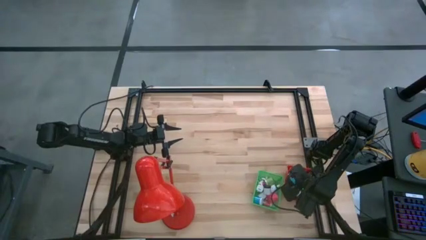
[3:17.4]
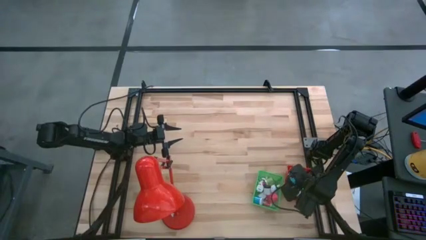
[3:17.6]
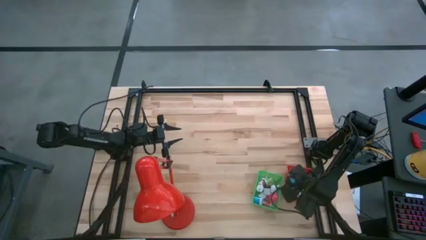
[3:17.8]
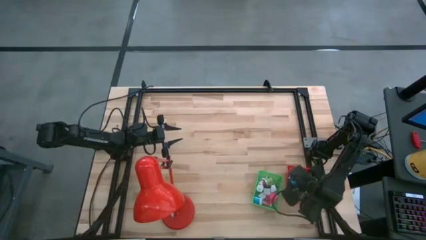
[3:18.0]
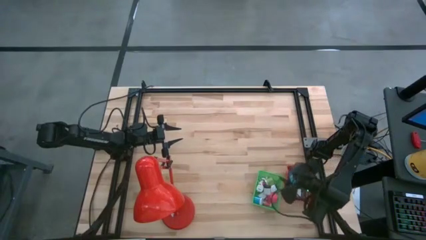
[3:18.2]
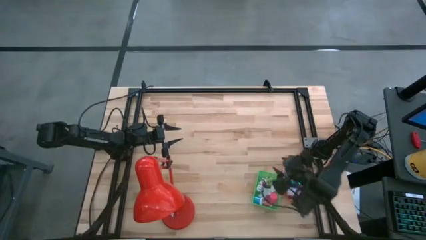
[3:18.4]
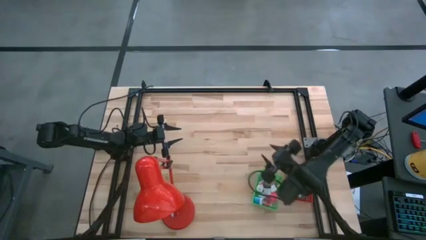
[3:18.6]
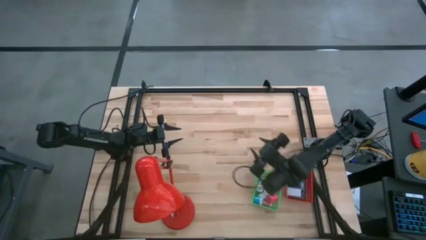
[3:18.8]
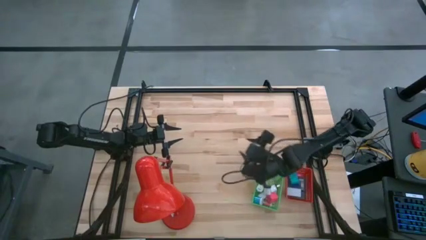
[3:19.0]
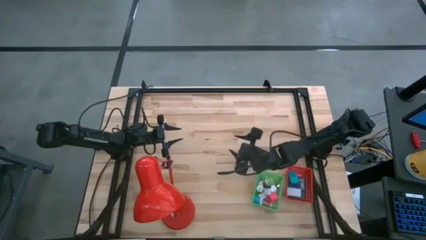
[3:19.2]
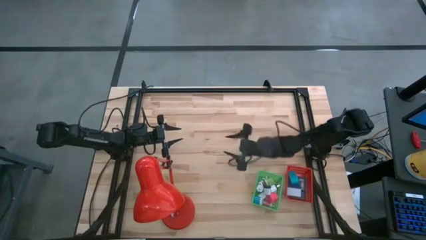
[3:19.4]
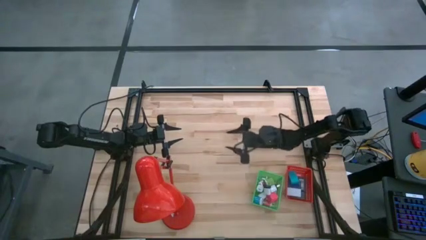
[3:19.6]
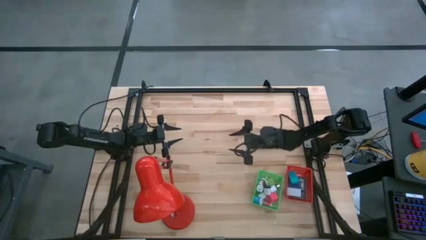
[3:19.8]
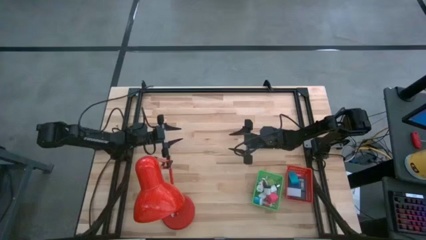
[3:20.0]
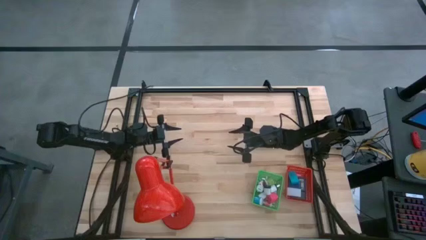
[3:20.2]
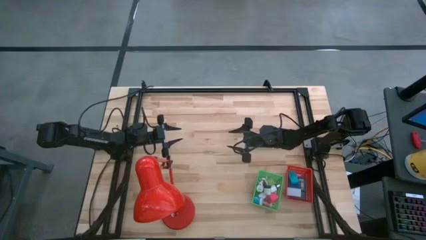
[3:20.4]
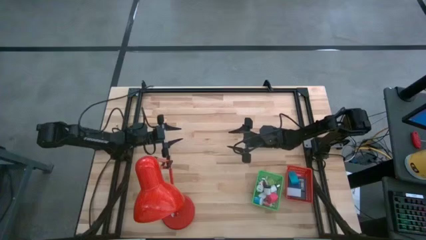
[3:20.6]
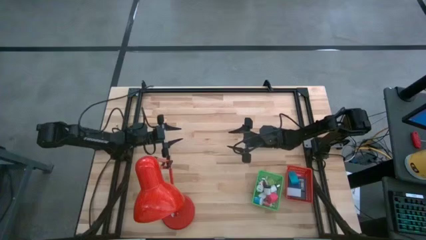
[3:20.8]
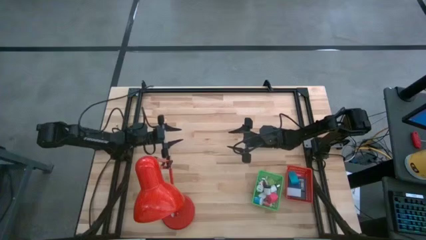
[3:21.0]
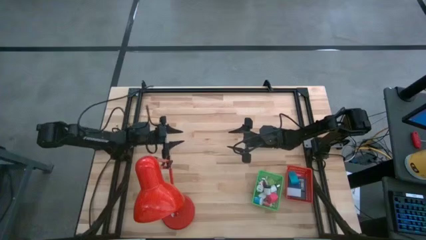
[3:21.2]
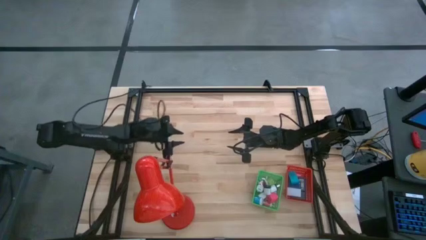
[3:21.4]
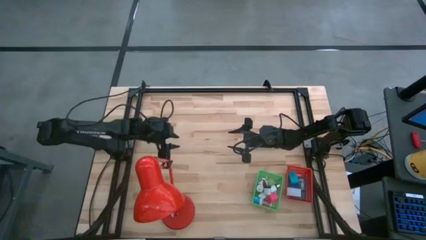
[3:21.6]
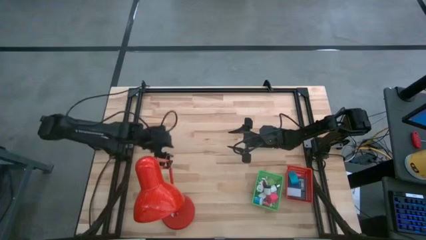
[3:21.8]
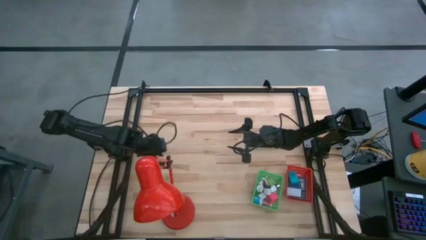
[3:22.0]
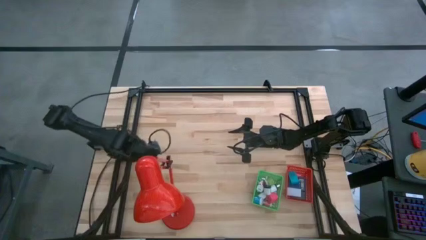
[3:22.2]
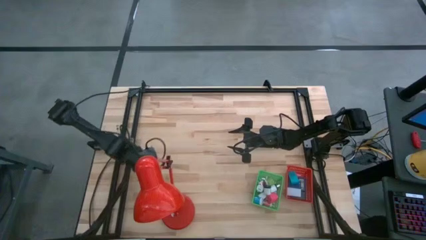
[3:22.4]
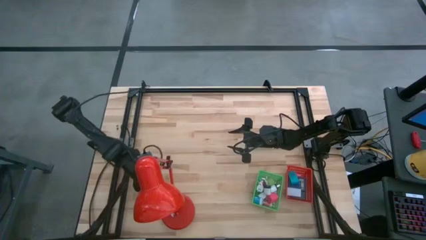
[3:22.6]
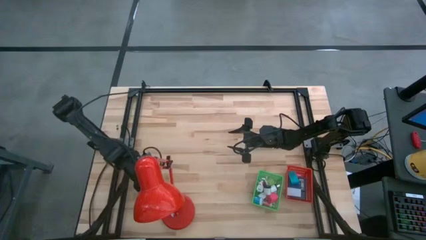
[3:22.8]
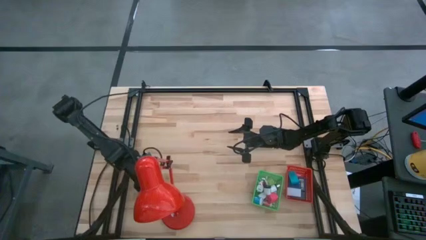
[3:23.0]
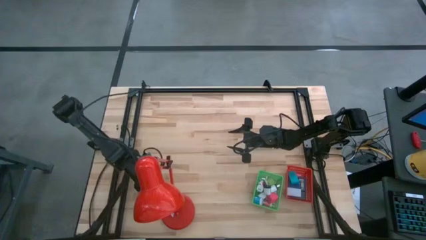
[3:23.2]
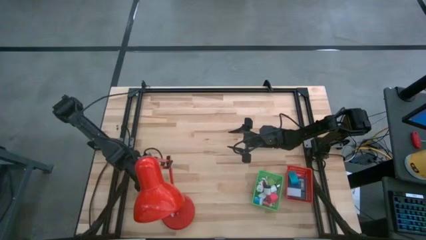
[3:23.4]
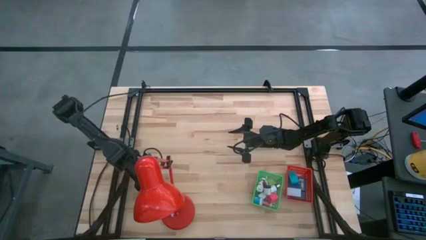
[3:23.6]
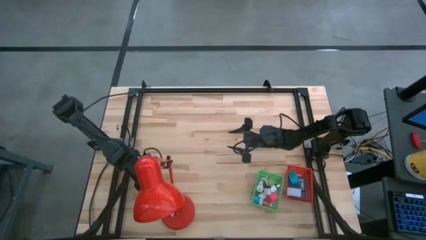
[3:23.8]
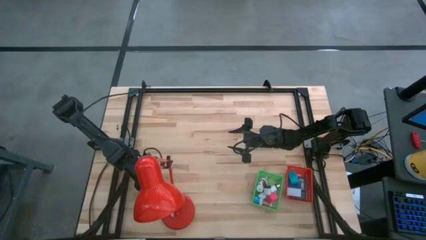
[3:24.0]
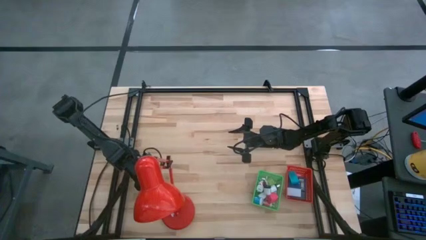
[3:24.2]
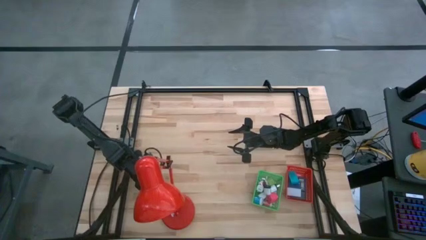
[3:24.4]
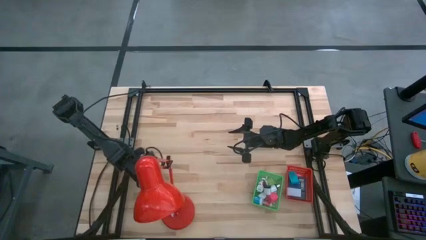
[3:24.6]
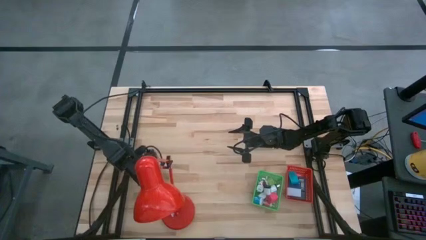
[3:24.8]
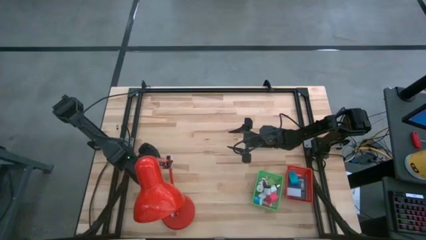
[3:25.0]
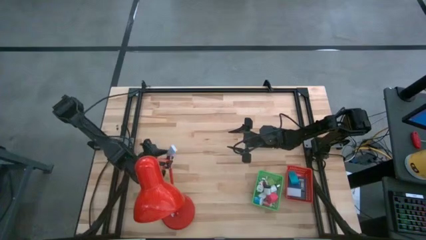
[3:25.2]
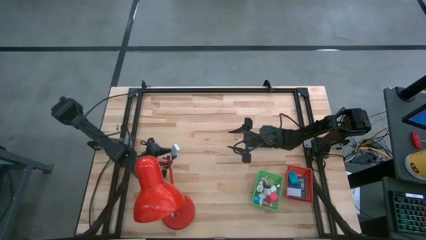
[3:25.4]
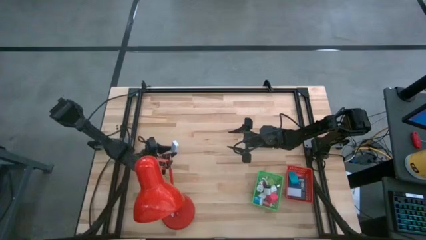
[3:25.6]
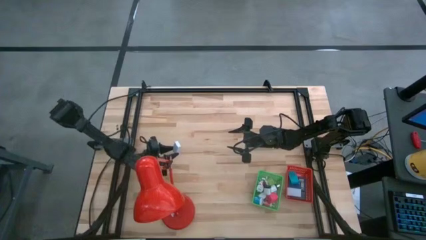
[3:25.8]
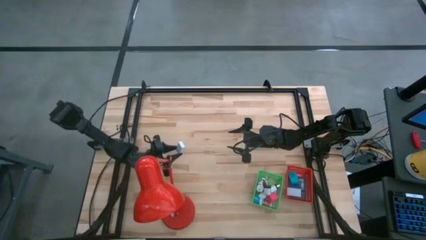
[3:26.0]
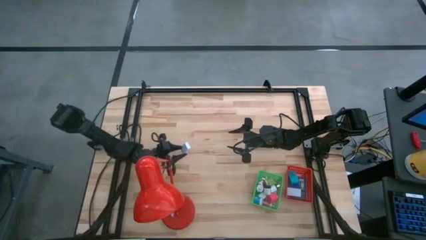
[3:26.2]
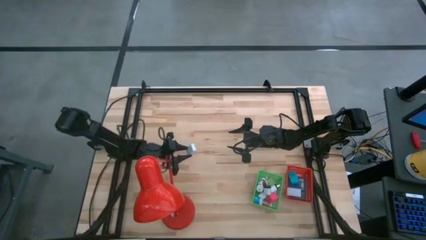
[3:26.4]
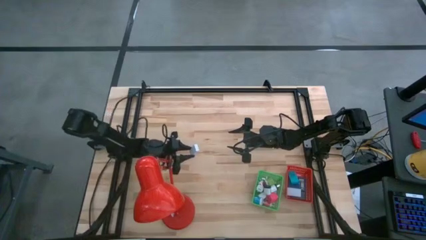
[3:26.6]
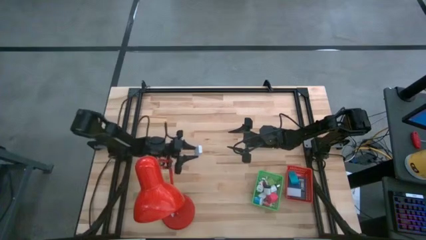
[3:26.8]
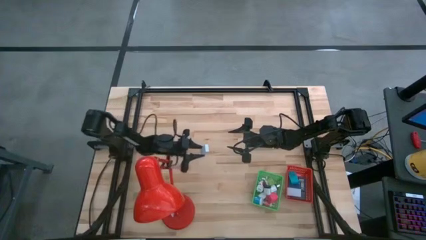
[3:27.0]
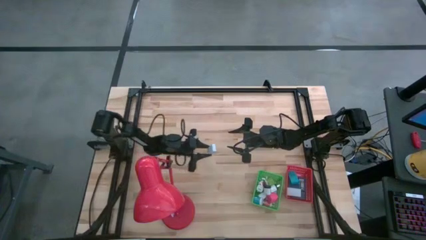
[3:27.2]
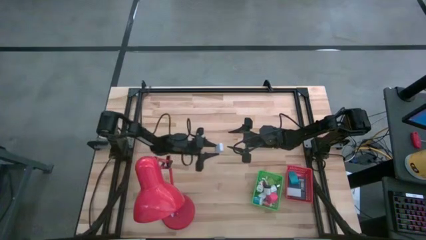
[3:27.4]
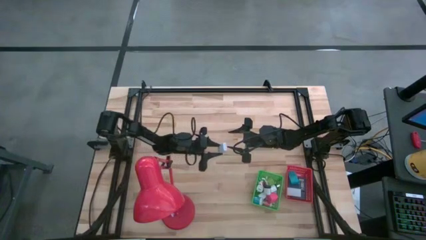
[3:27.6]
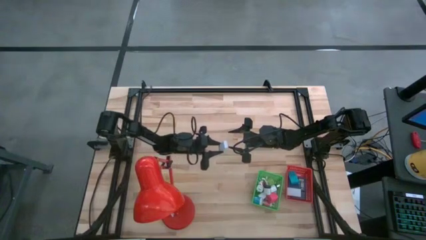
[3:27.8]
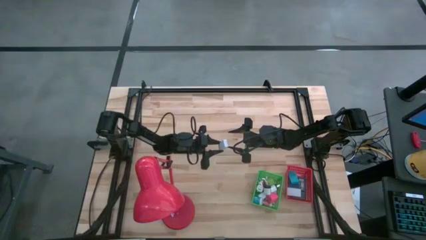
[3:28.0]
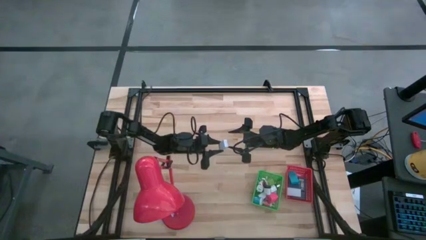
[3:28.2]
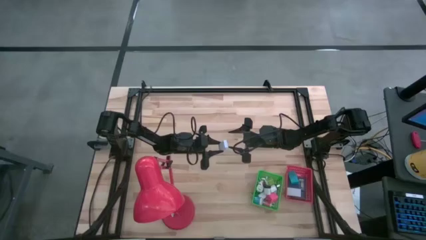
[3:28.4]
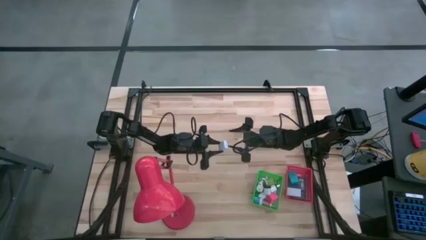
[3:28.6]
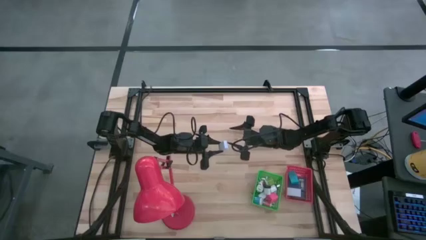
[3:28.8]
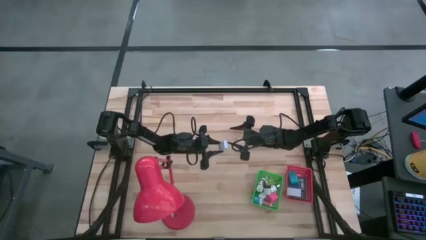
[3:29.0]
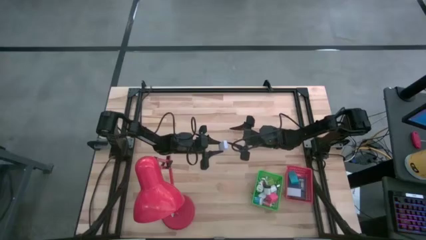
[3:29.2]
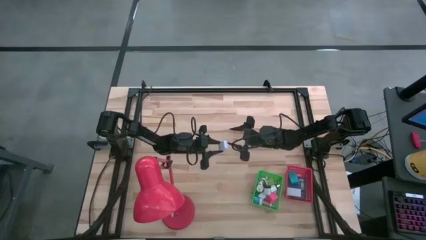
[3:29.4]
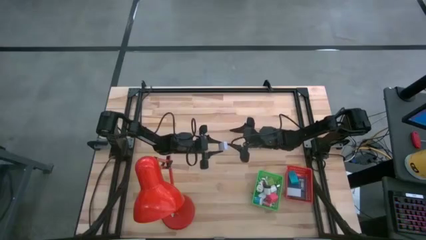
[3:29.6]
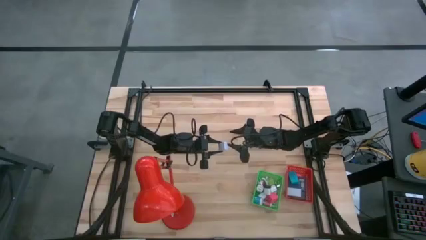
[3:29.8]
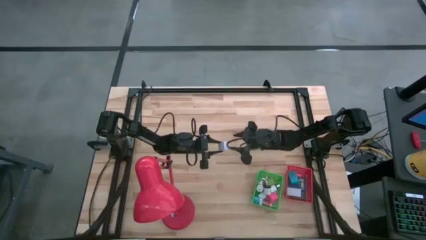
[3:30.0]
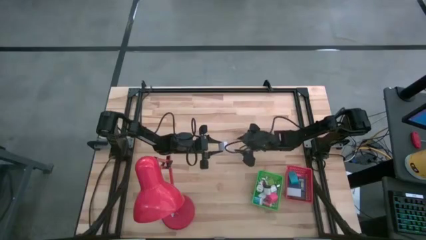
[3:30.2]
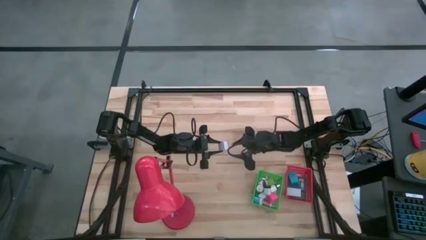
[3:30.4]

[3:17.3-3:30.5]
Task: Pick & Place Office items
Put the white digital clock into the red basket

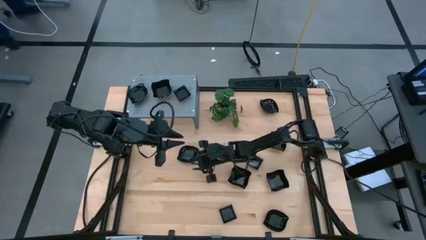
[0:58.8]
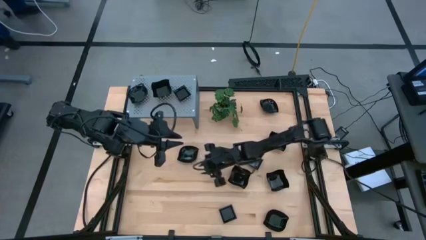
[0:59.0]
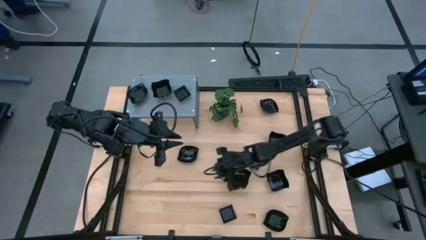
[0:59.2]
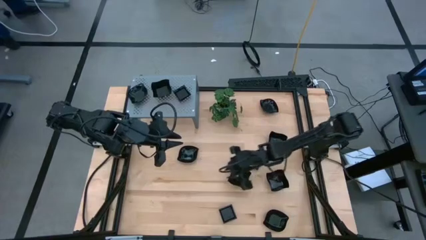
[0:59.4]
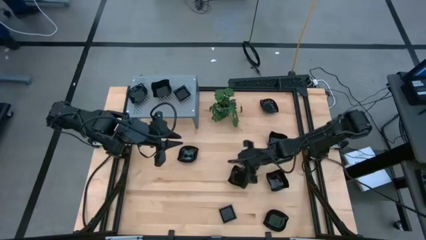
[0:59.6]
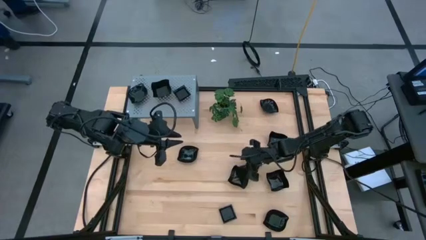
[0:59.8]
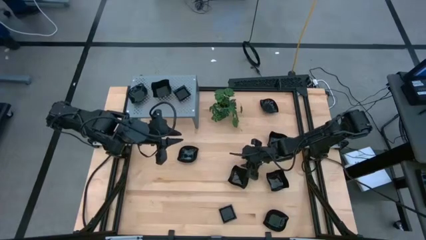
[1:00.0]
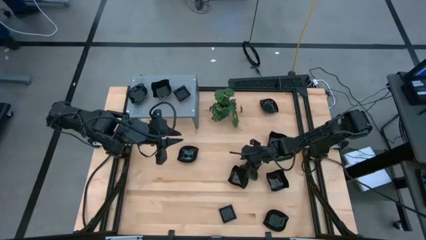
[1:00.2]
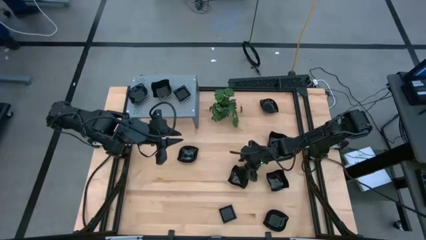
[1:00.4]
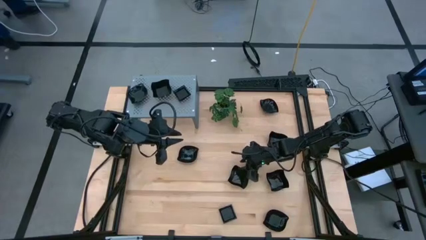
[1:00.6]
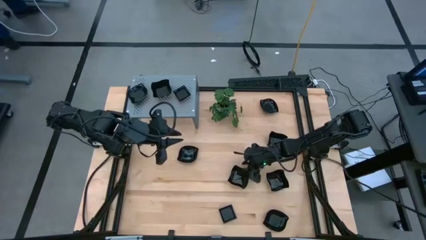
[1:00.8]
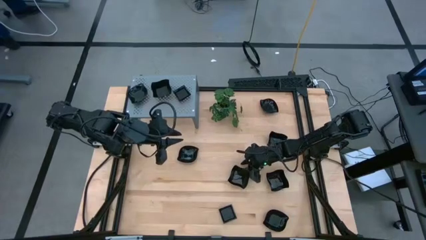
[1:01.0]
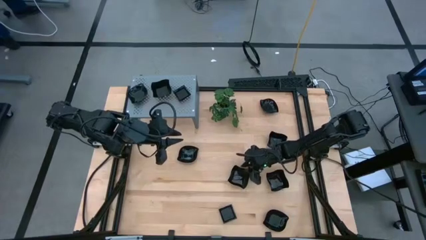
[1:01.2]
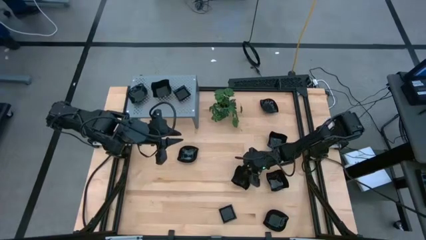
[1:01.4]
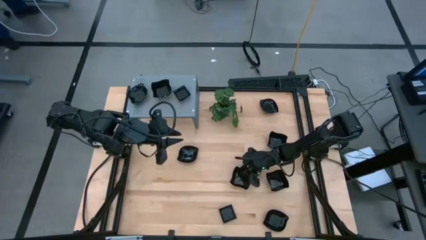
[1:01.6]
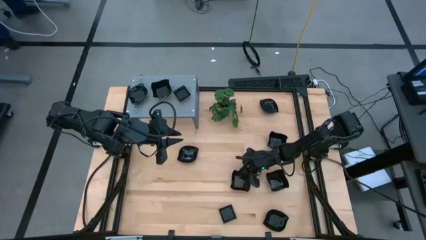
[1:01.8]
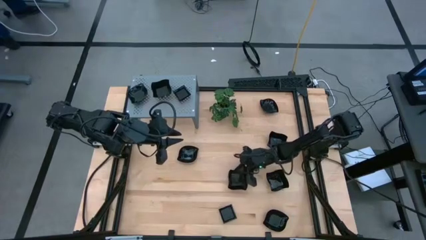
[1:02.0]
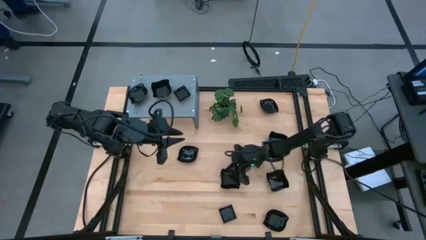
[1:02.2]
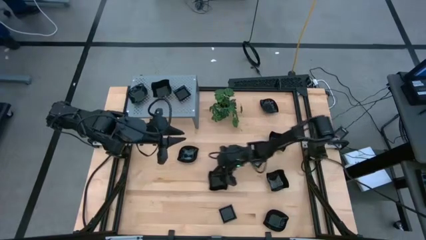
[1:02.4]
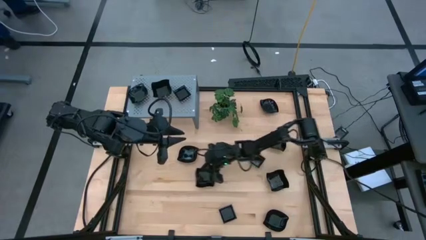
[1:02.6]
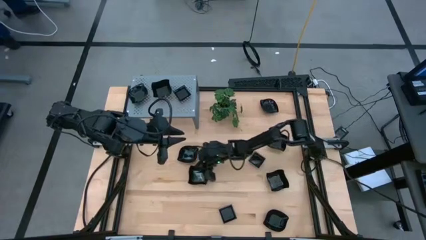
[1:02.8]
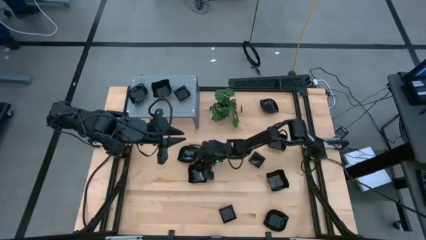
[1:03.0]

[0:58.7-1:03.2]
Task: Pick & Place Mini shaped plates
Move the black distorted square plate to the center of the table

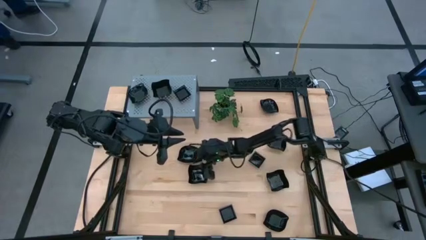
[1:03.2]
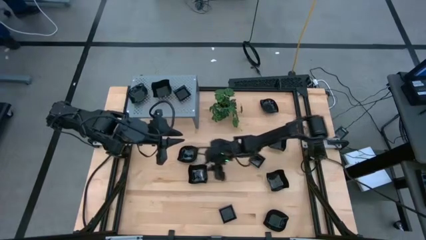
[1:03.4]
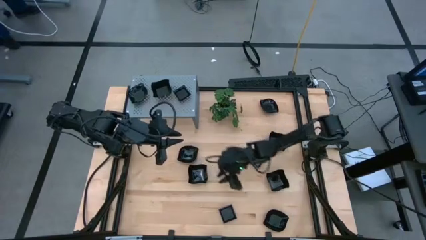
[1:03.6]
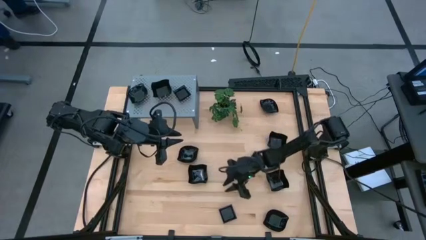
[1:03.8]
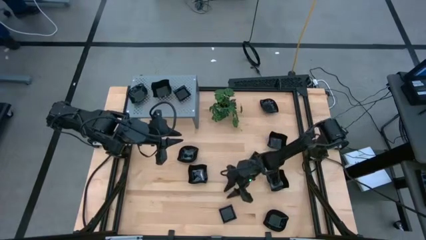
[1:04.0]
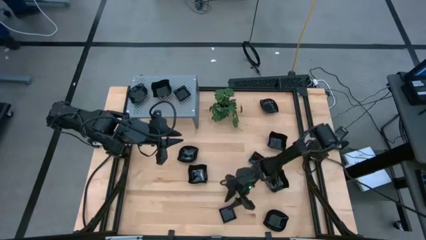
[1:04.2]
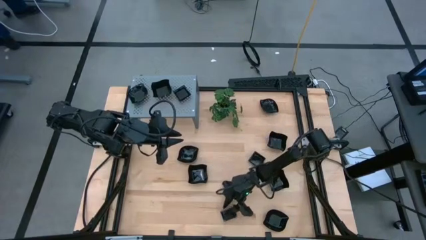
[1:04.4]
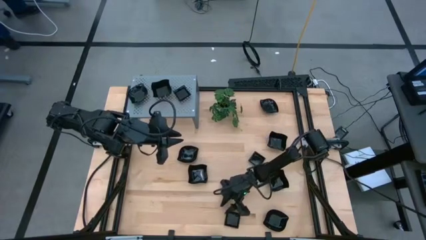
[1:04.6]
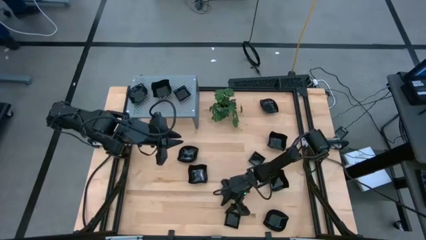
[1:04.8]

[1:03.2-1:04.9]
Move the black square plate to the center of the table
